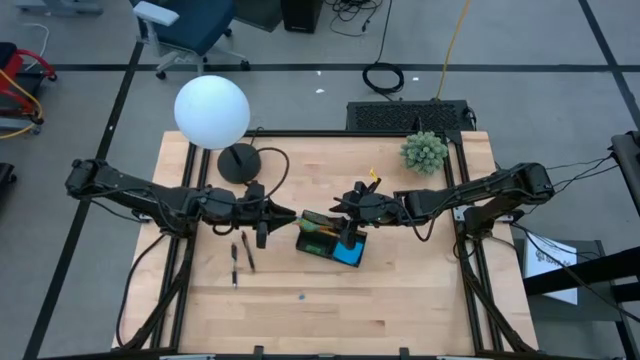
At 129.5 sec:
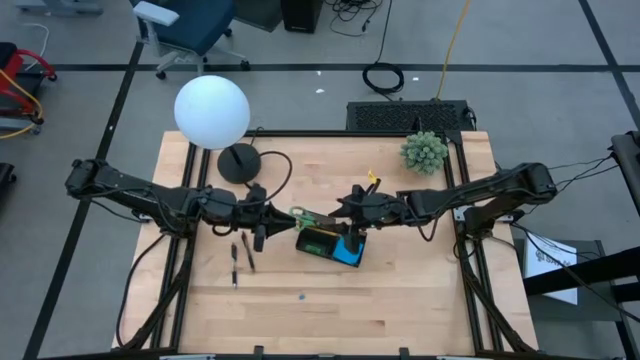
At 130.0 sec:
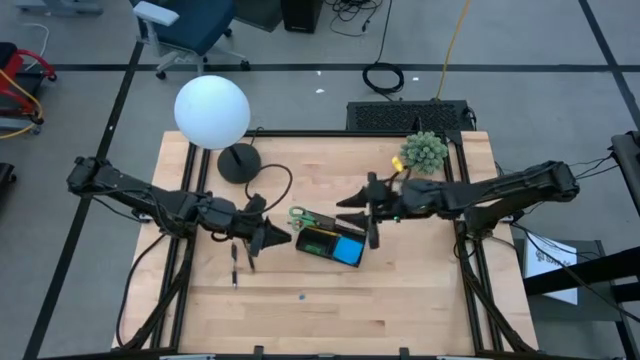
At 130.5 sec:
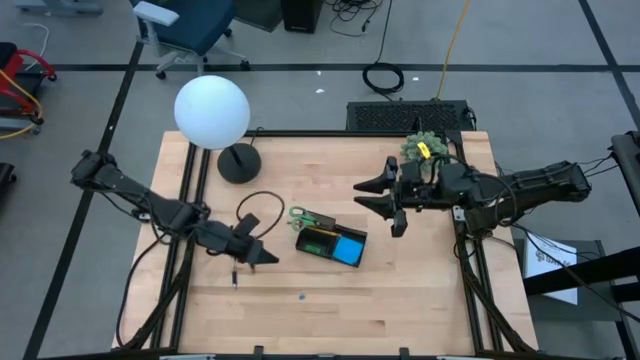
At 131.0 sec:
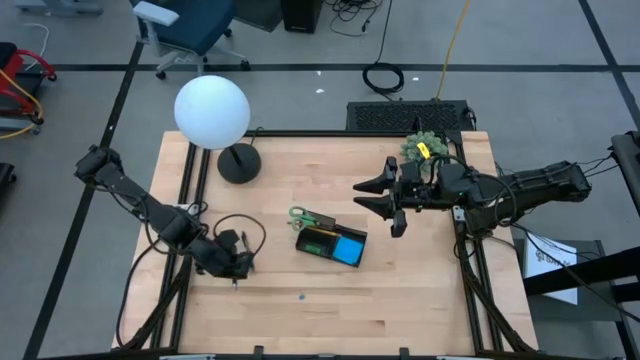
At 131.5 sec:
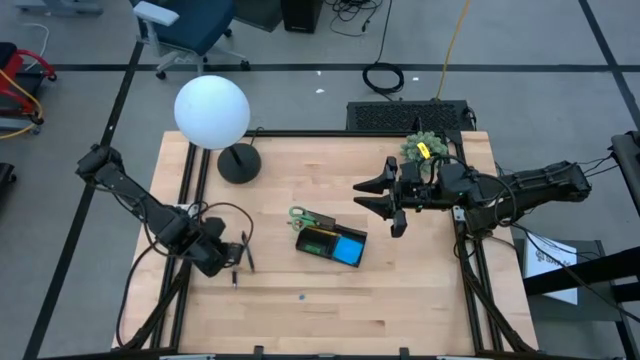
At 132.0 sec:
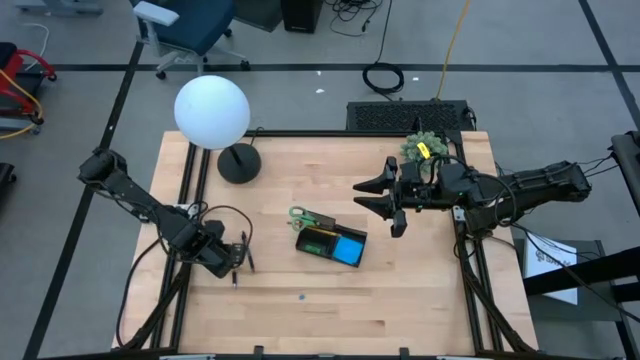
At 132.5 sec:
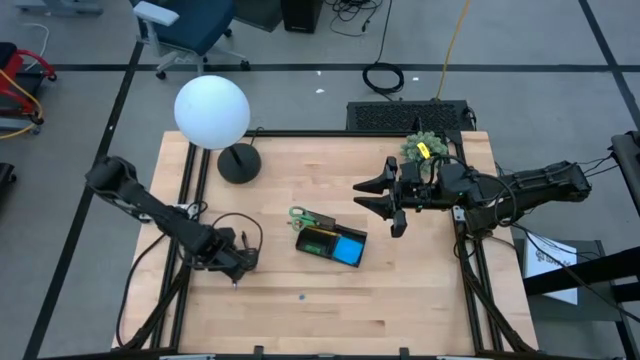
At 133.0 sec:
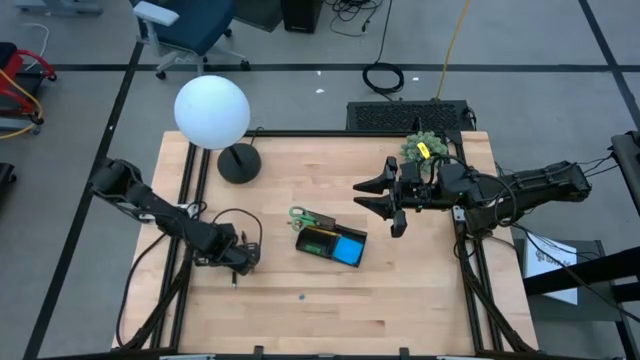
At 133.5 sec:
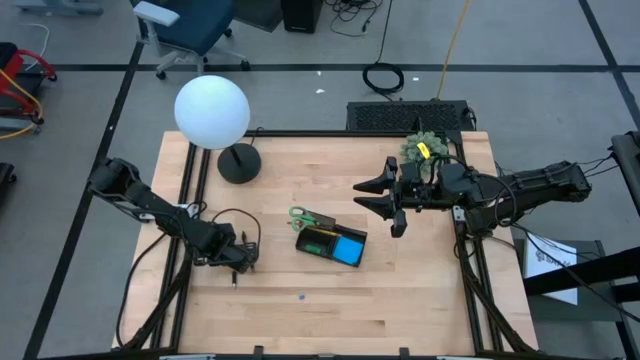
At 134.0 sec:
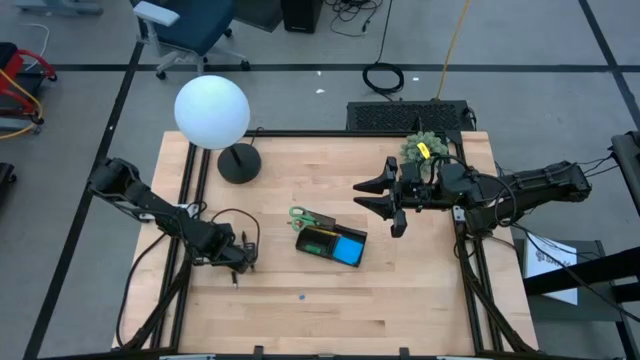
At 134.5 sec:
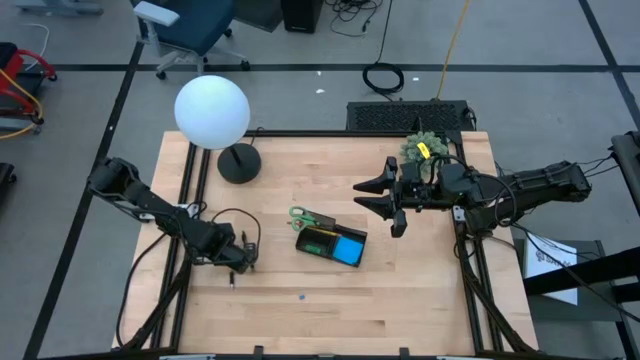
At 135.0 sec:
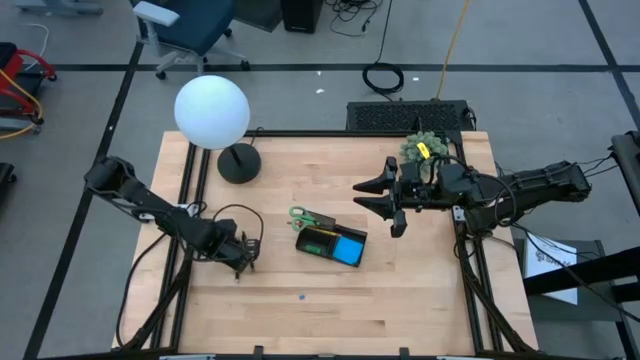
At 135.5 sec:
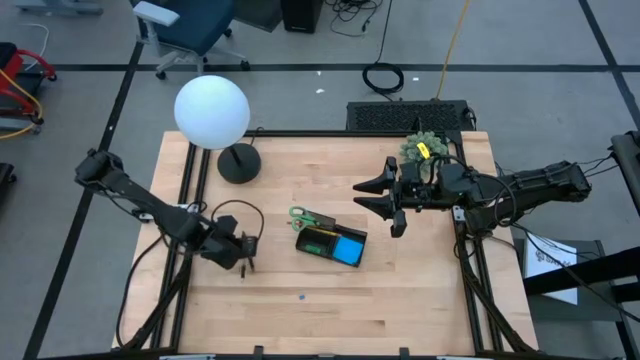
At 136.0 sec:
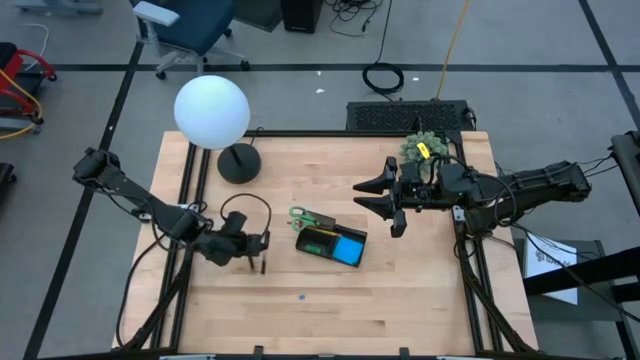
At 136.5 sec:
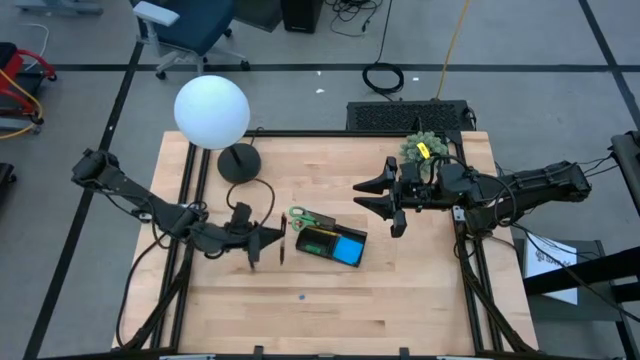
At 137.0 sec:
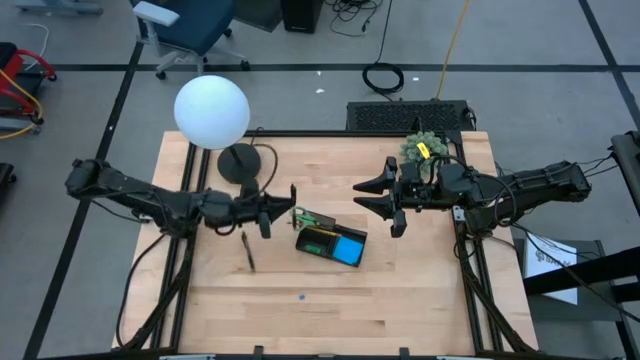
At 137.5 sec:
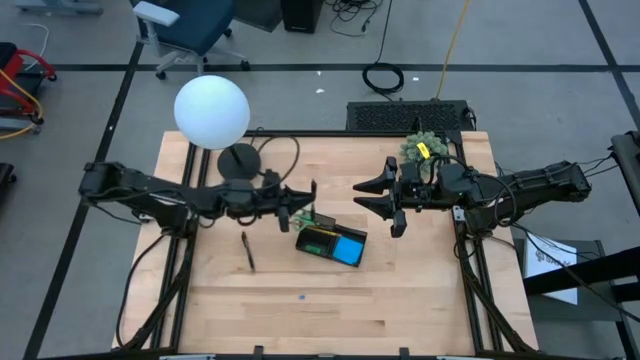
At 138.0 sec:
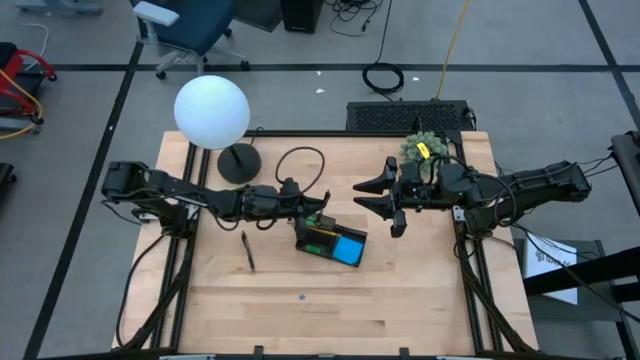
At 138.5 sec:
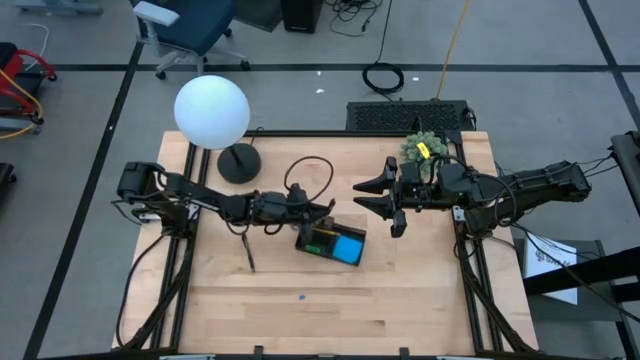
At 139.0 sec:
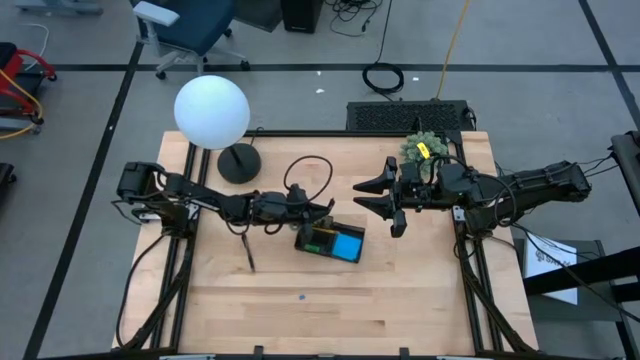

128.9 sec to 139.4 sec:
Task: Pick and place office supplies into organizer
Put the left black pen into the desk organizer

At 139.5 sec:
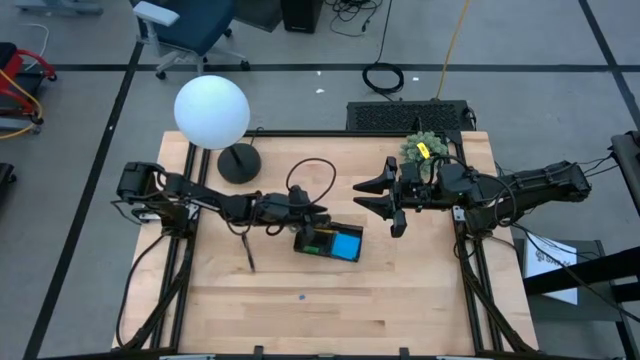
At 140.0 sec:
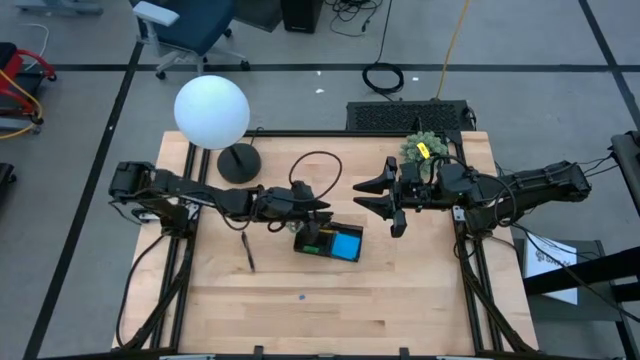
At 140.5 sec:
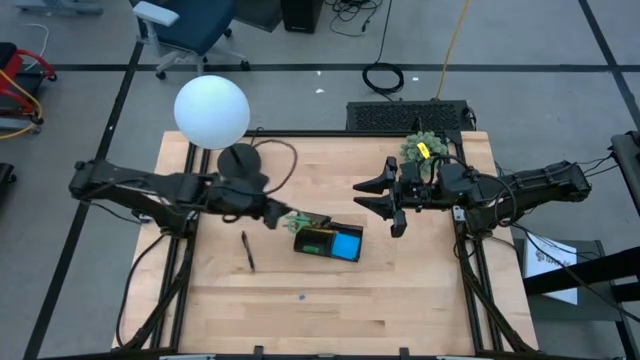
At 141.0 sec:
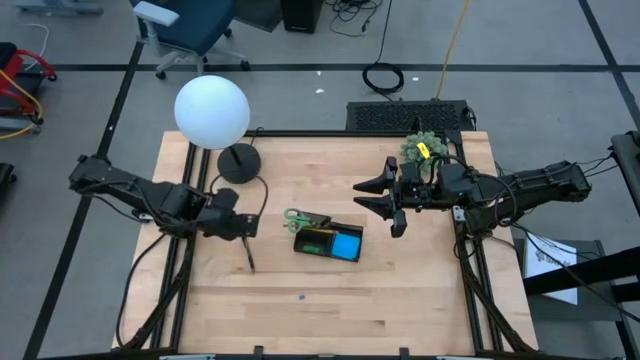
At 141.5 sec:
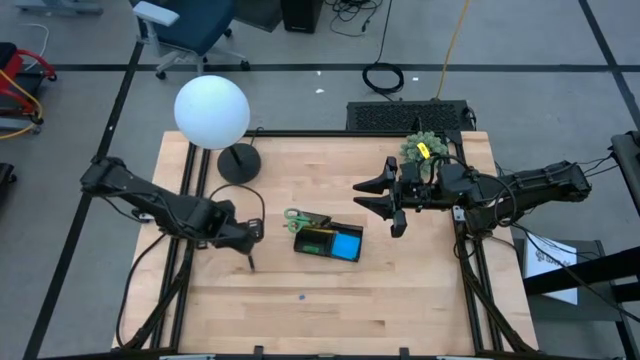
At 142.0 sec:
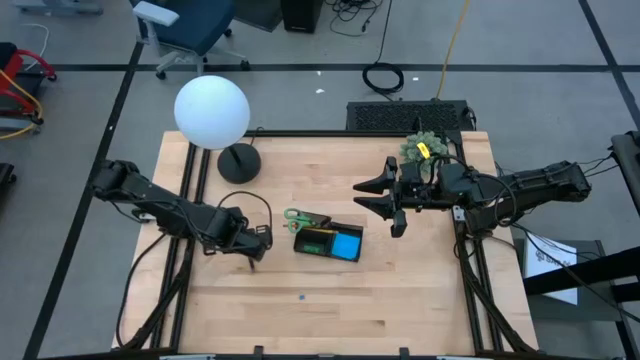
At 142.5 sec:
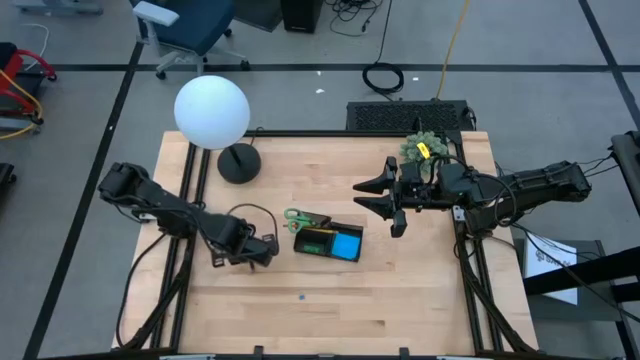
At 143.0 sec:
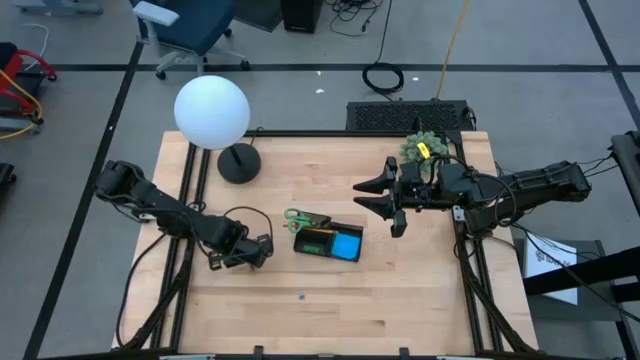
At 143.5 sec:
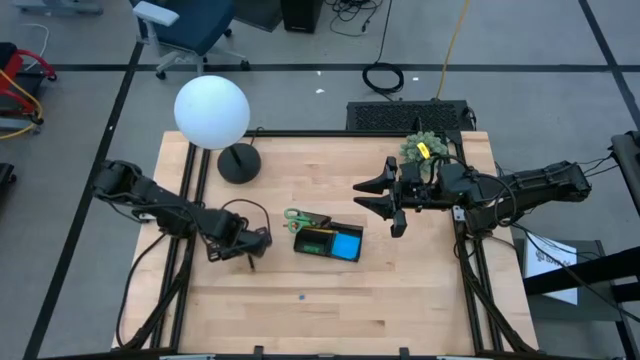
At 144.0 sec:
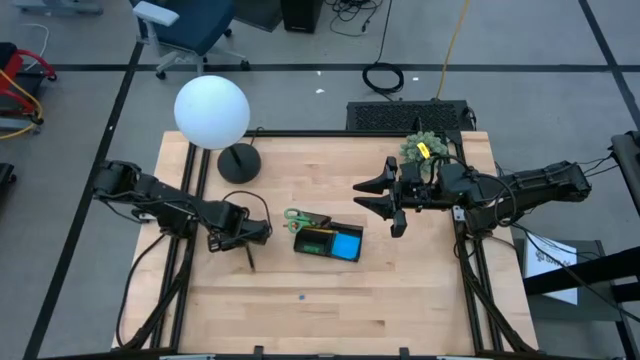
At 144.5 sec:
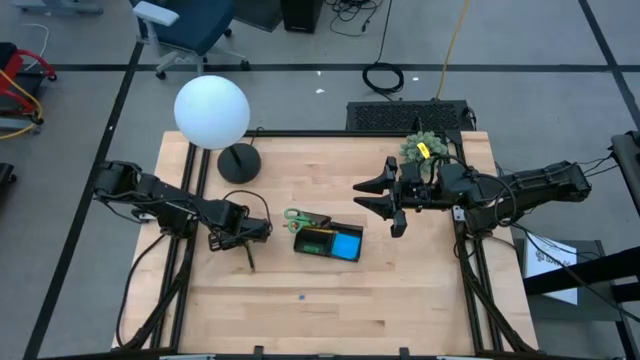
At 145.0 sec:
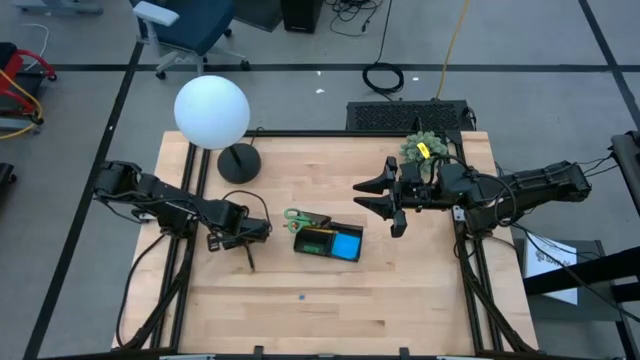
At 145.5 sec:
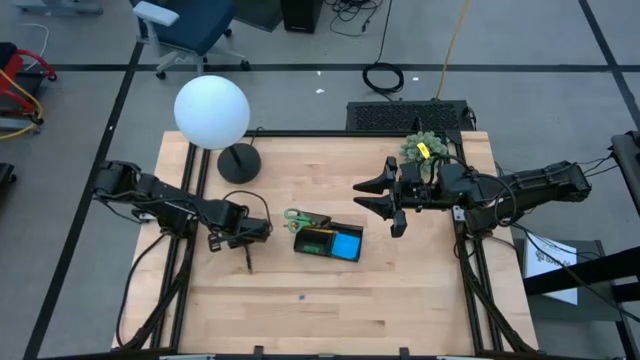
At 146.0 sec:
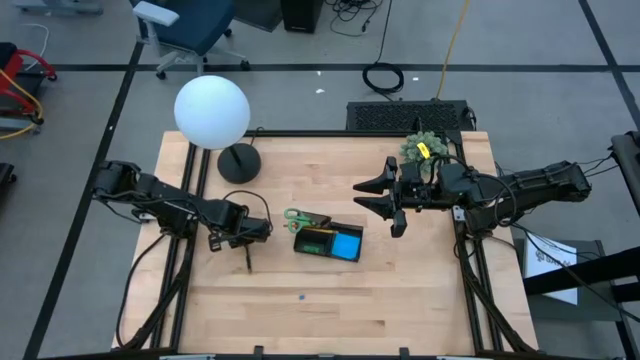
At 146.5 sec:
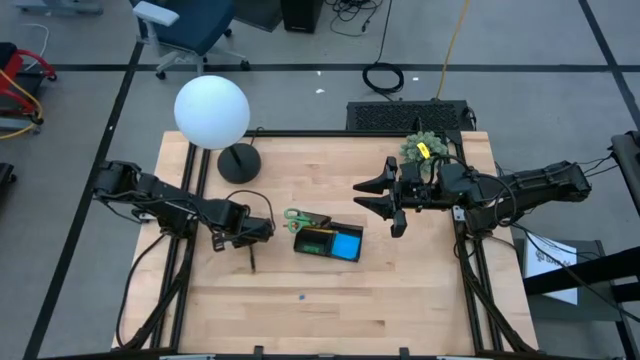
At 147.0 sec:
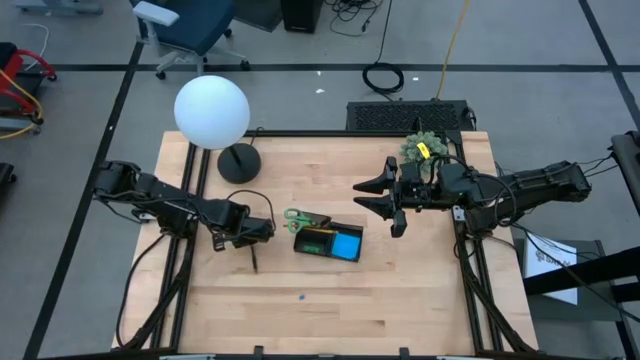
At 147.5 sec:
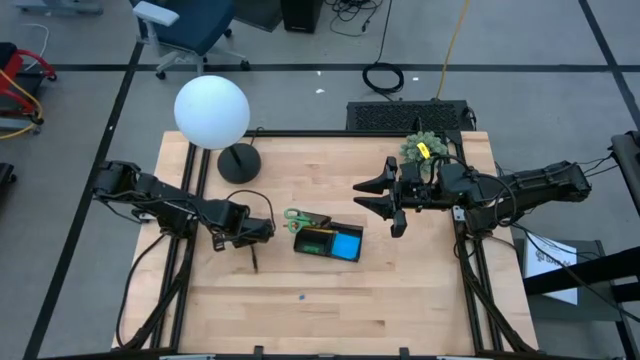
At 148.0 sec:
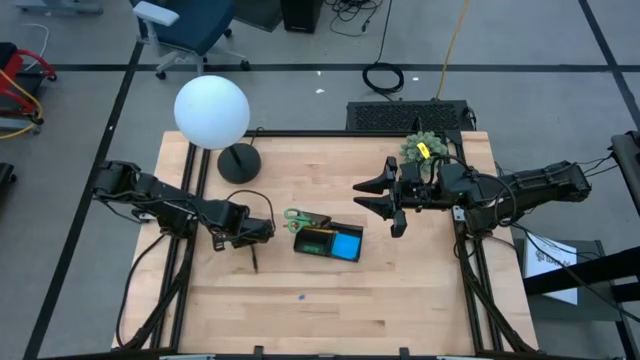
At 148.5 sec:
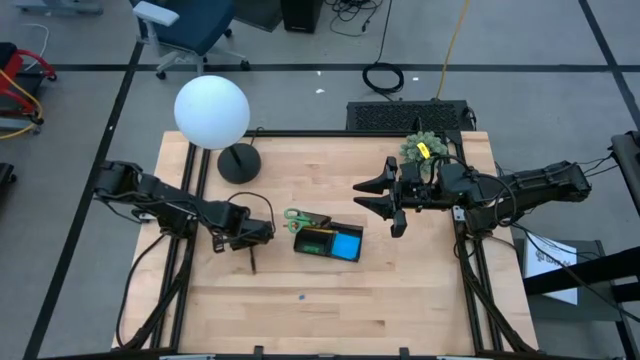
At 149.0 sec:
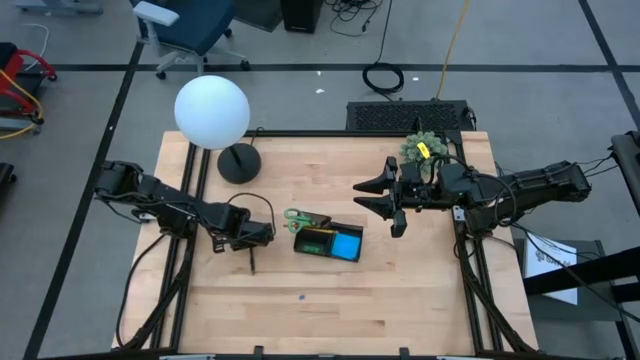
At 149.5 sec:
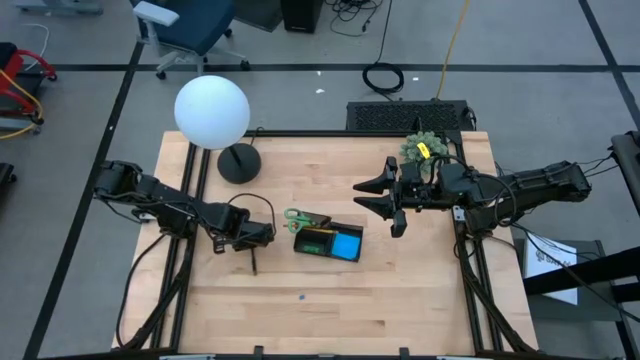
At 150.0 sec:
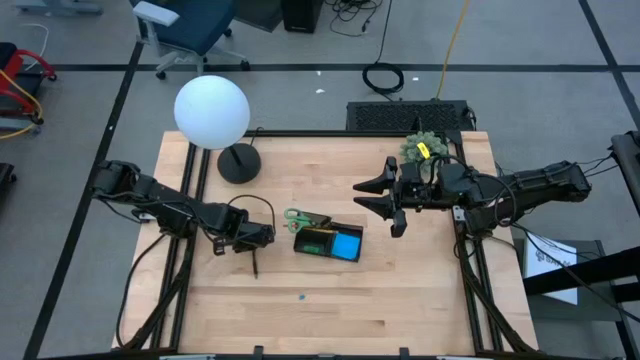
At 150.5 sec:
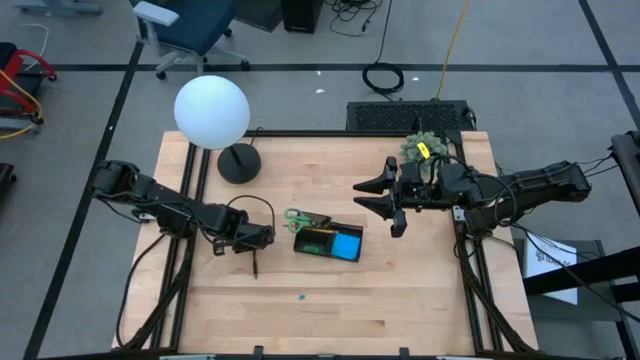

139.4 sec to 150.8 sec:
Put the black pen into the desk organizer
